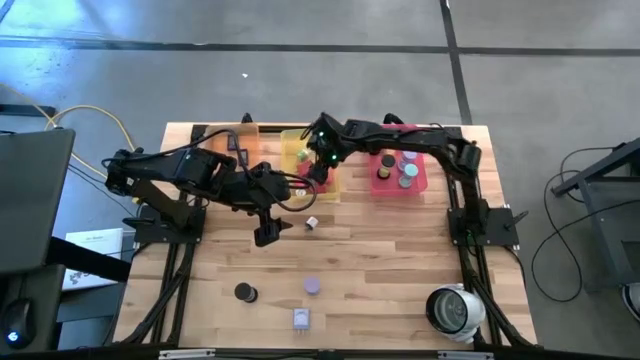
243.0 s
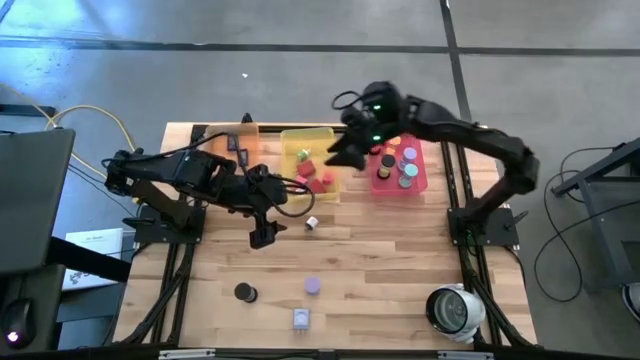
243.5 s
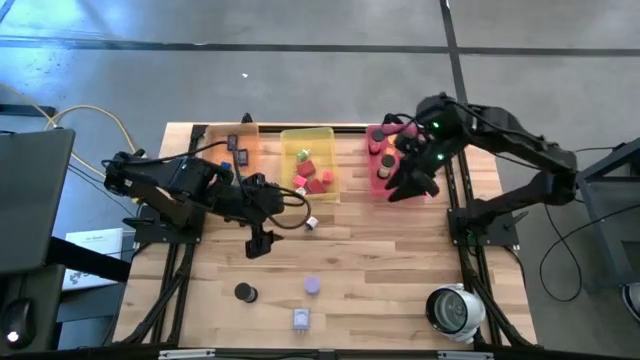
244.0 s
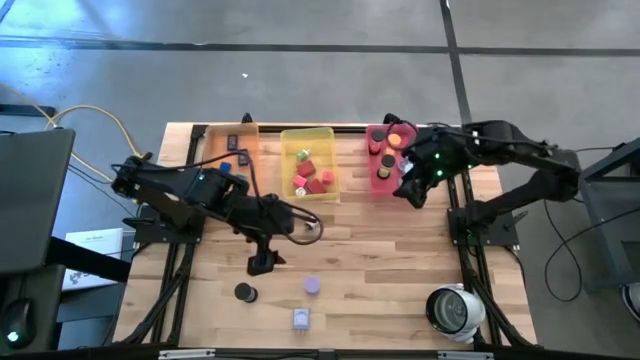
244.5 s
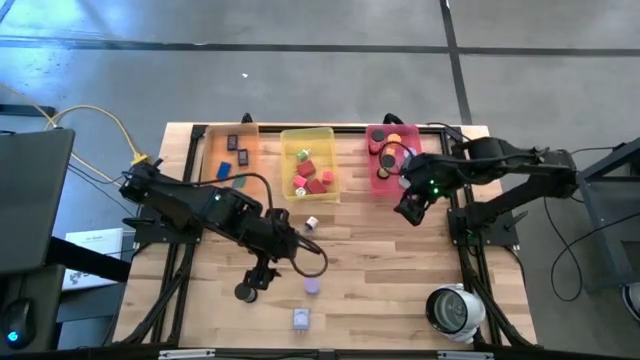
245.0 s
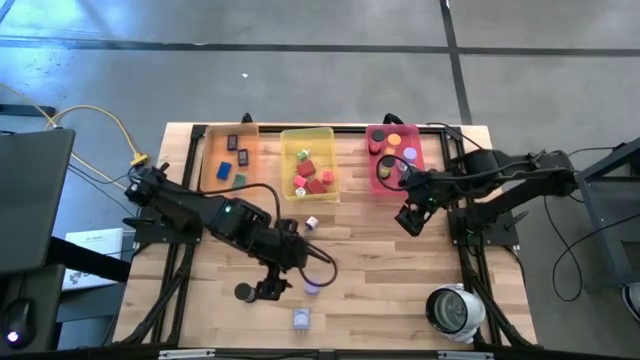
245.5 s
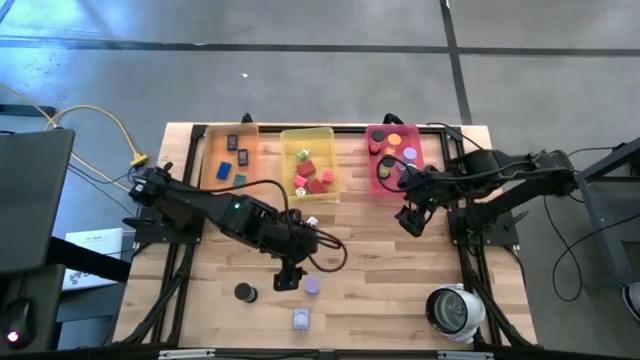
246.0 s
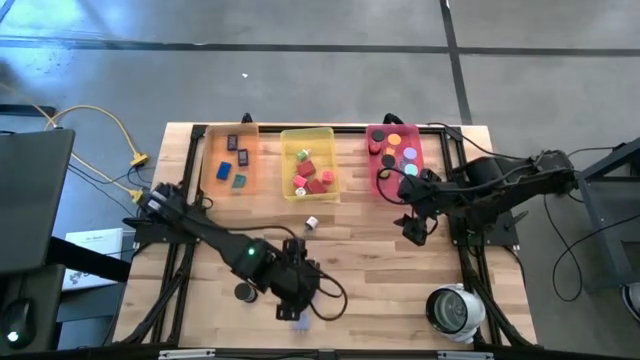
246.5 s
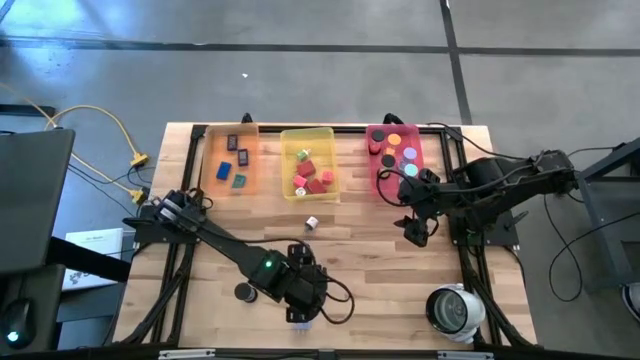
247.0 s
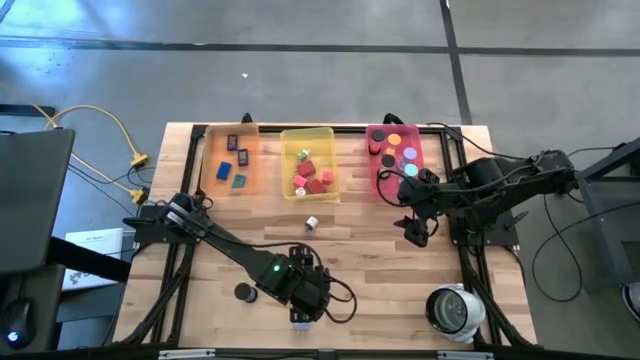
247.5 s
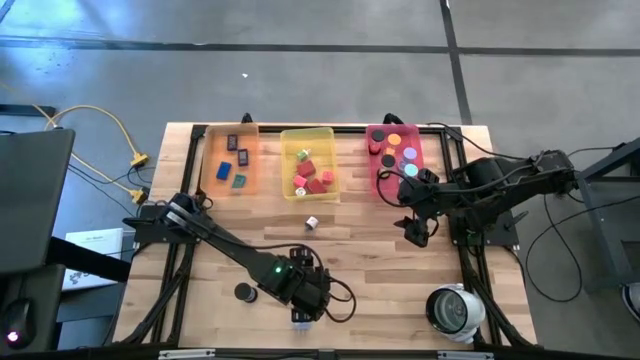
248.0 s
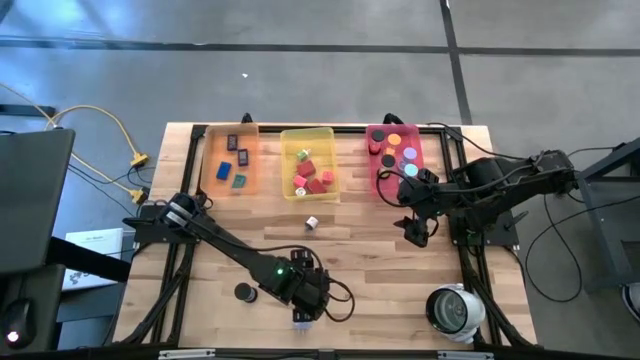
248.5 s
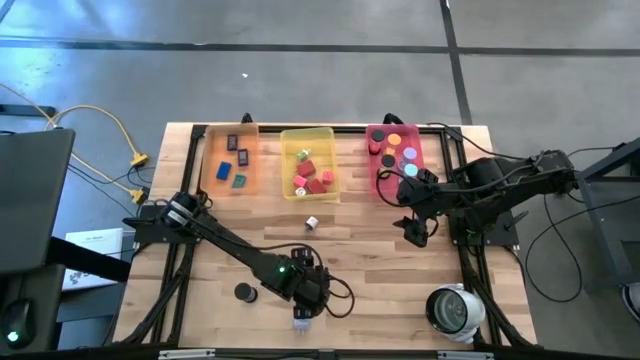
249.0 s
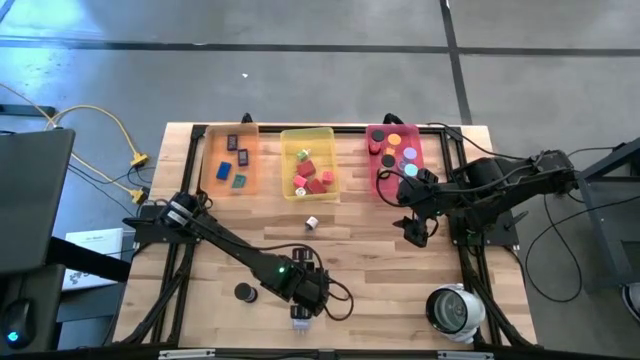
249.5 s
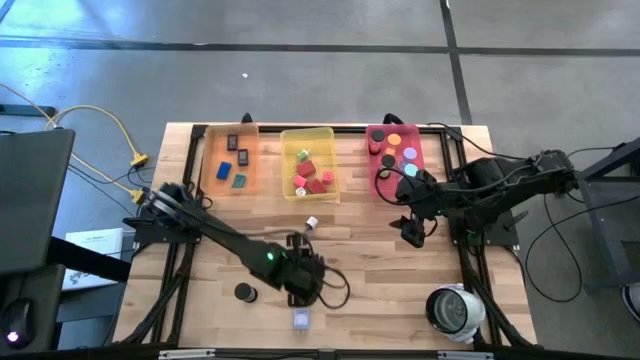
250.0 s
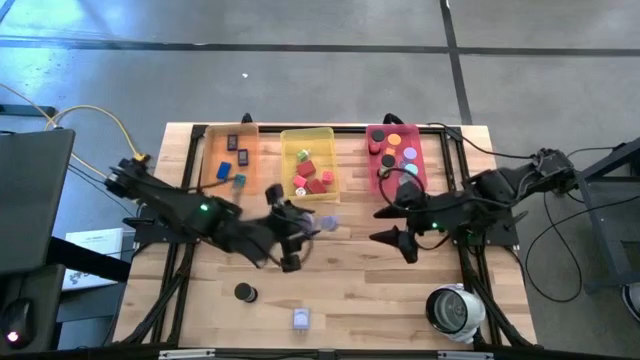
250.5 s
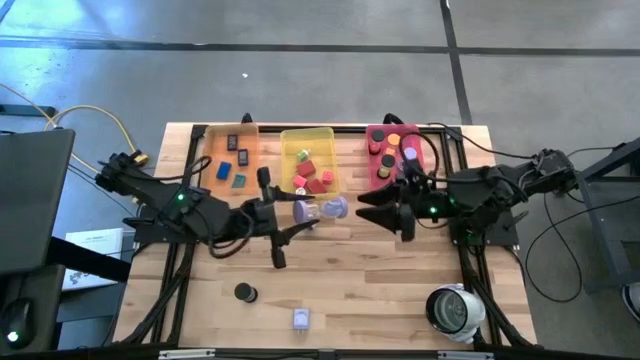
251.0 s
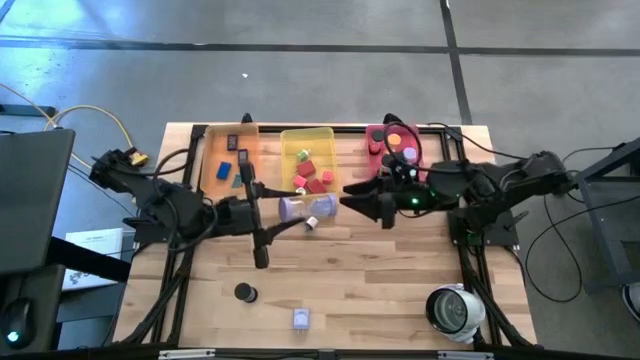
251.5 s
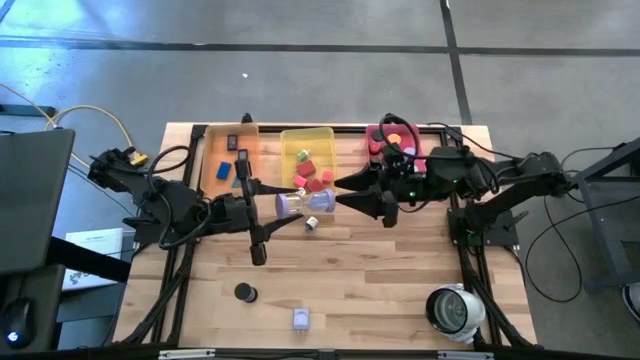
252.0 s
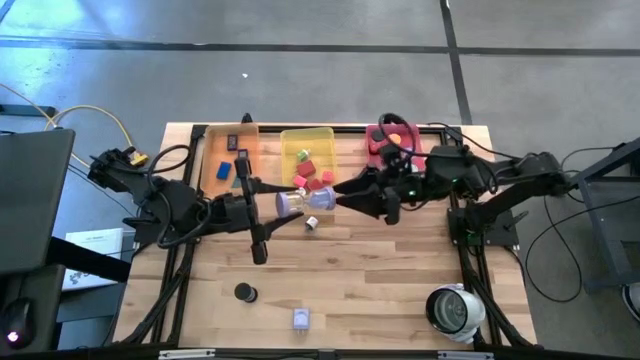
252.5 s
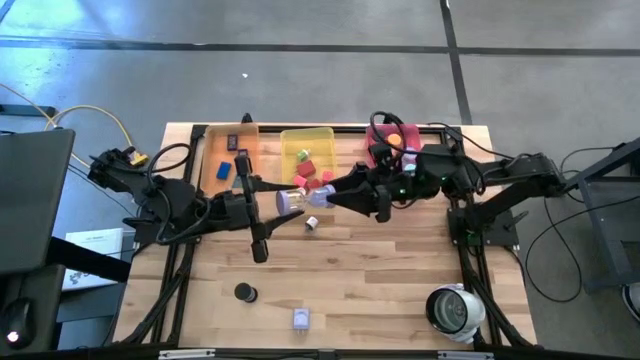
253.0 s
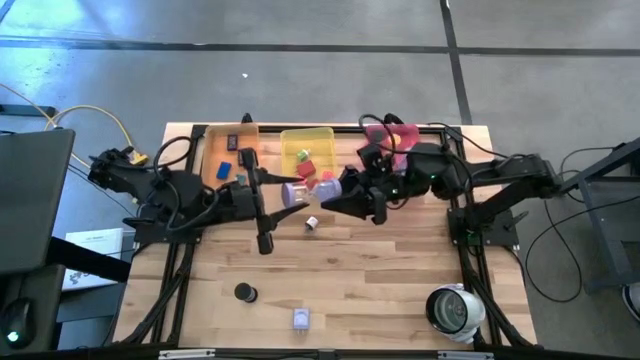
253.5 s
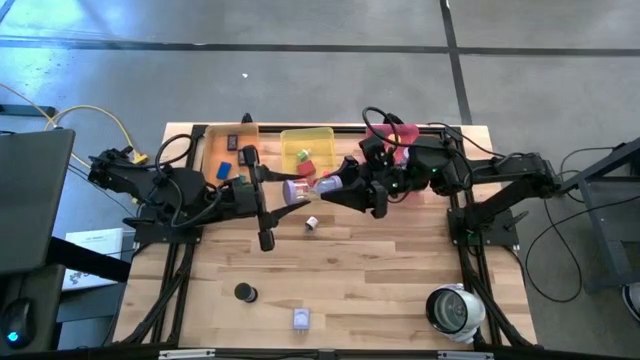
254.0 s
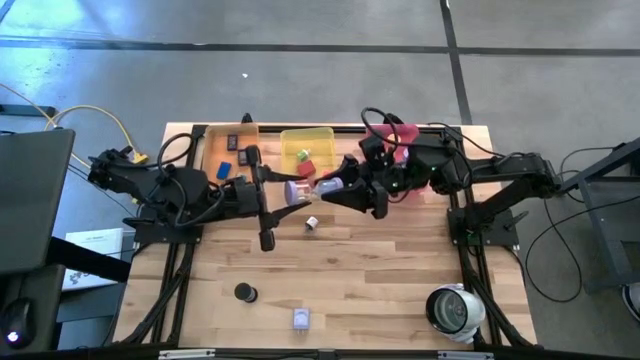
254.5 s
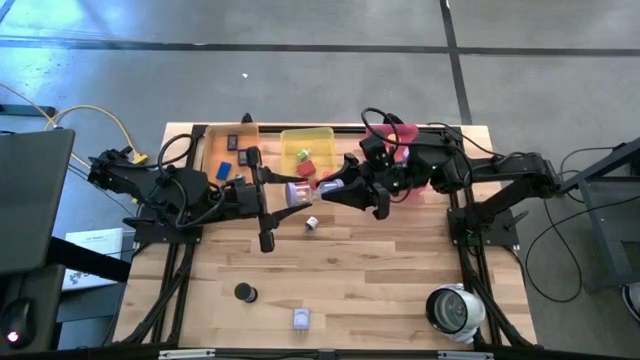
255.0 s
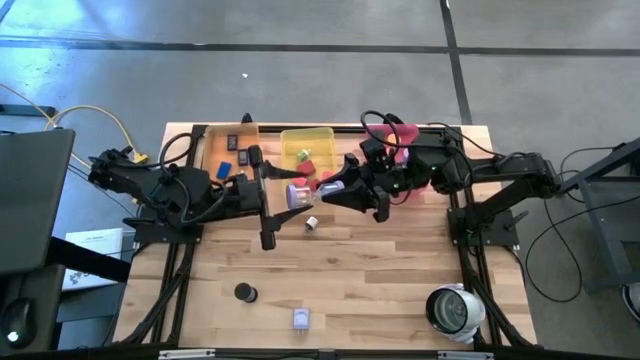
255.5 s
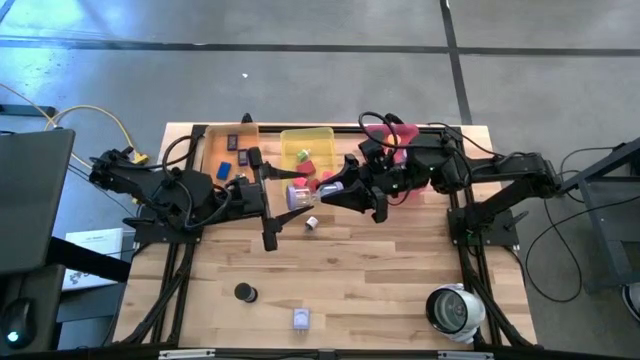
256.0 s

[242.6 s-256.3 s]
Task: Pick & Place Office items
Put the purple sand timer into the pink bin
